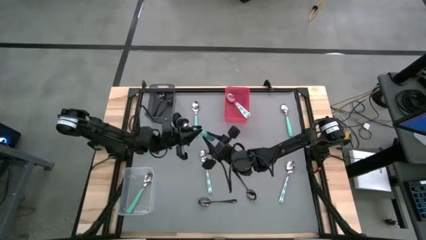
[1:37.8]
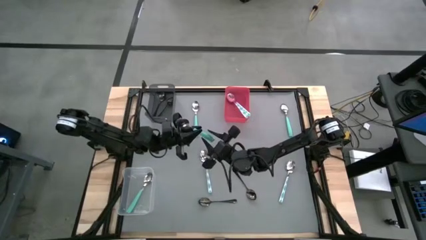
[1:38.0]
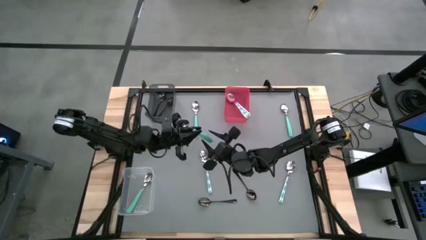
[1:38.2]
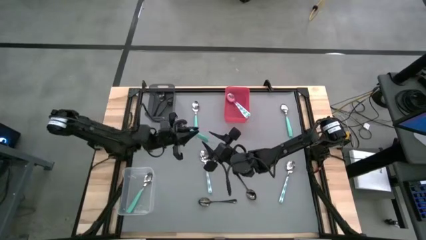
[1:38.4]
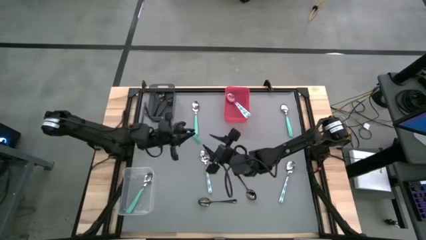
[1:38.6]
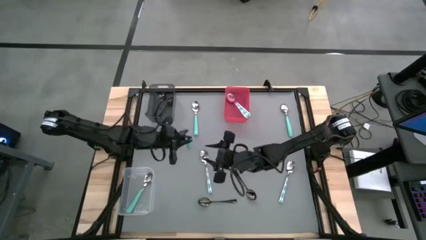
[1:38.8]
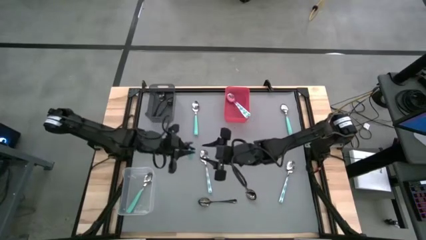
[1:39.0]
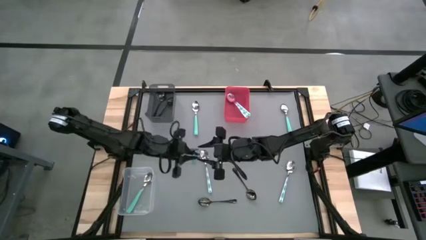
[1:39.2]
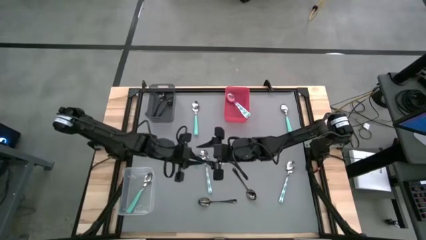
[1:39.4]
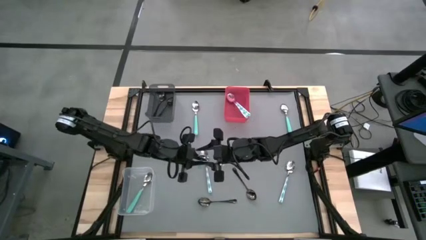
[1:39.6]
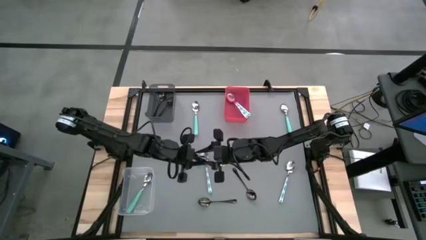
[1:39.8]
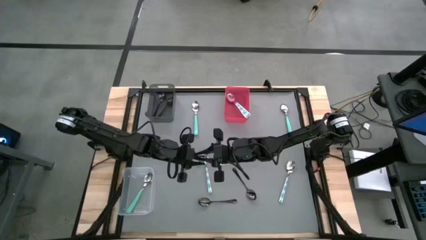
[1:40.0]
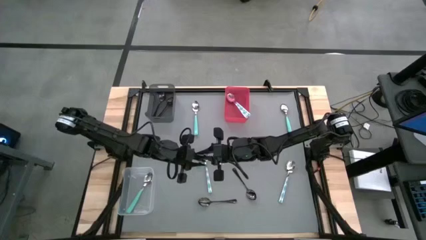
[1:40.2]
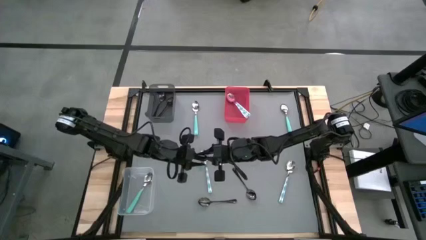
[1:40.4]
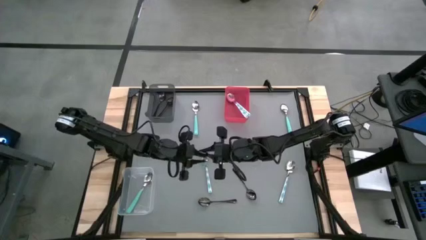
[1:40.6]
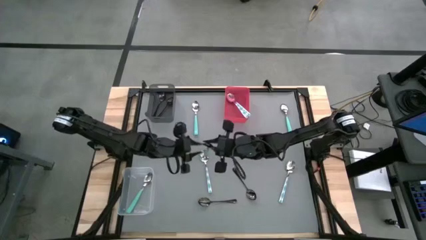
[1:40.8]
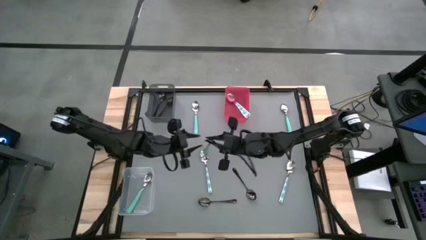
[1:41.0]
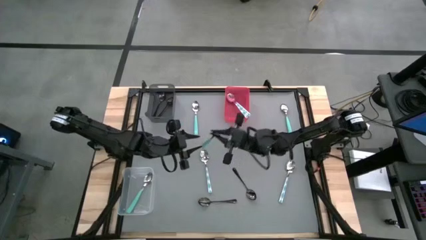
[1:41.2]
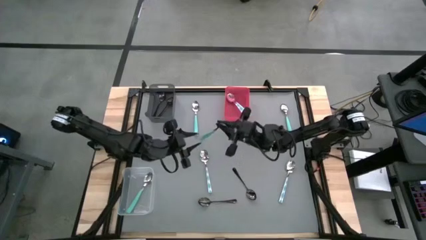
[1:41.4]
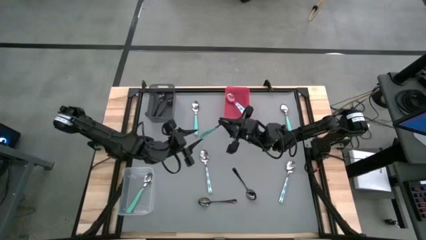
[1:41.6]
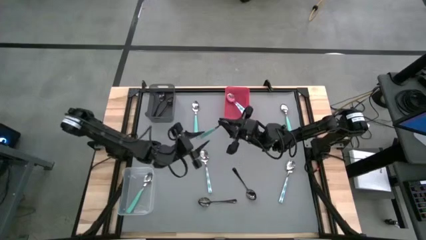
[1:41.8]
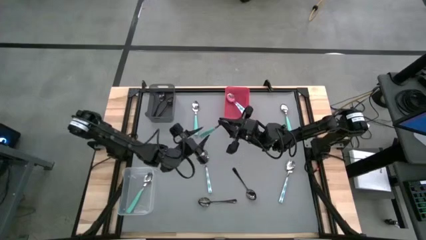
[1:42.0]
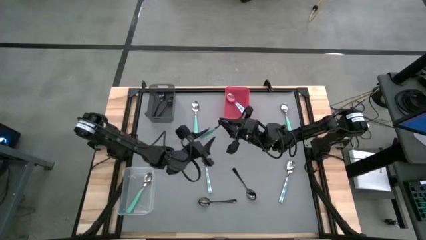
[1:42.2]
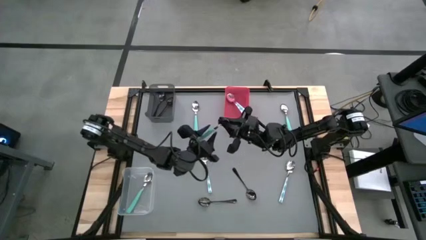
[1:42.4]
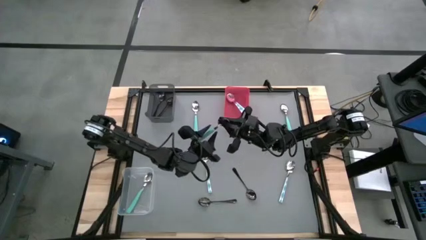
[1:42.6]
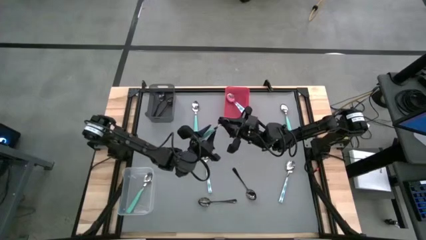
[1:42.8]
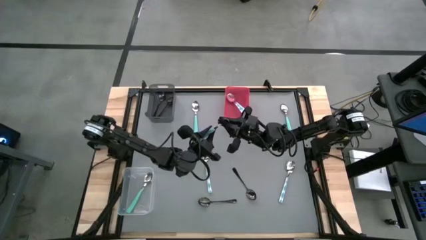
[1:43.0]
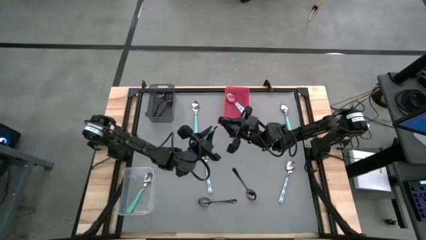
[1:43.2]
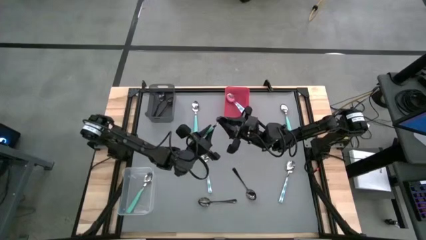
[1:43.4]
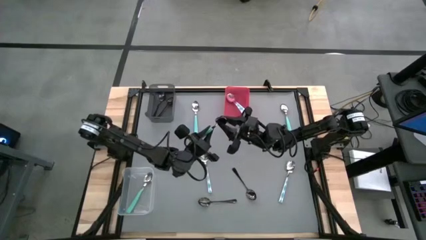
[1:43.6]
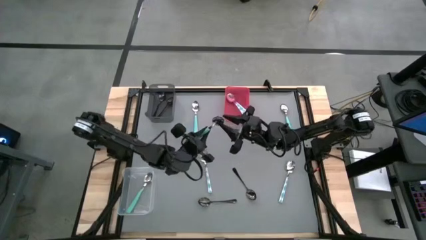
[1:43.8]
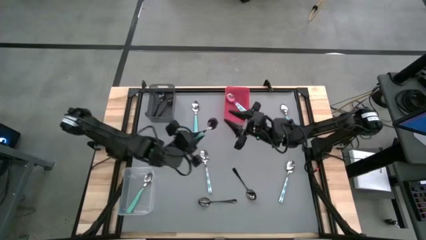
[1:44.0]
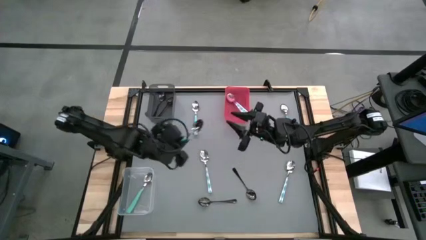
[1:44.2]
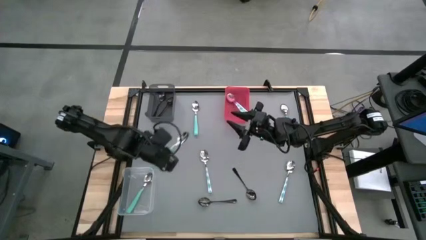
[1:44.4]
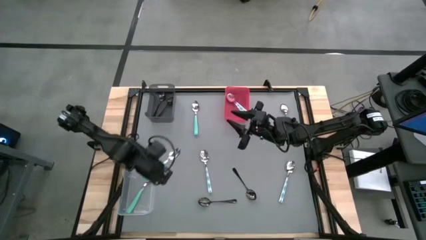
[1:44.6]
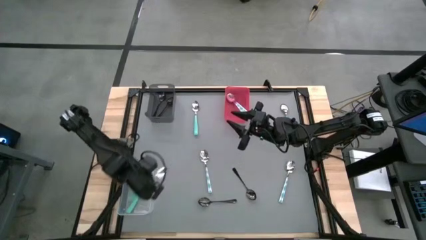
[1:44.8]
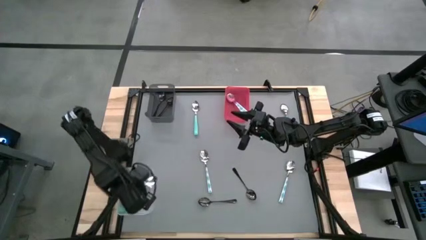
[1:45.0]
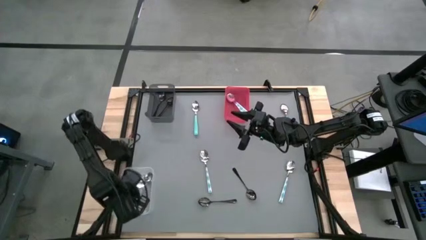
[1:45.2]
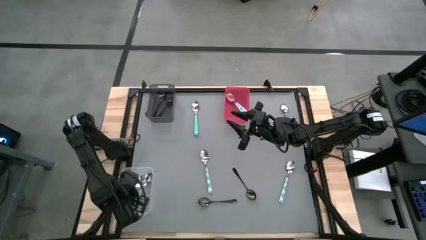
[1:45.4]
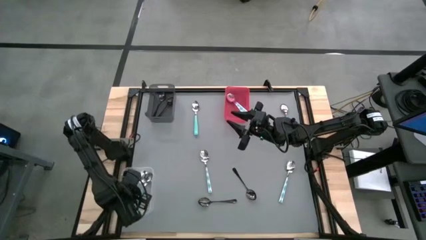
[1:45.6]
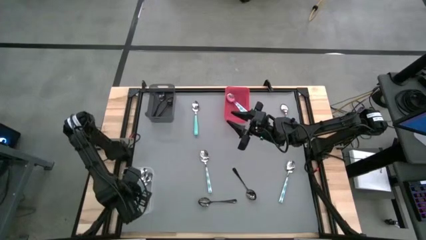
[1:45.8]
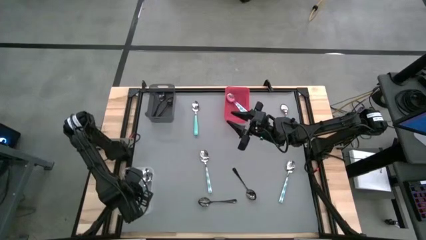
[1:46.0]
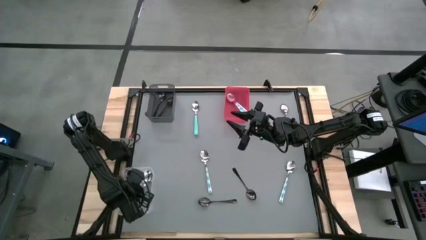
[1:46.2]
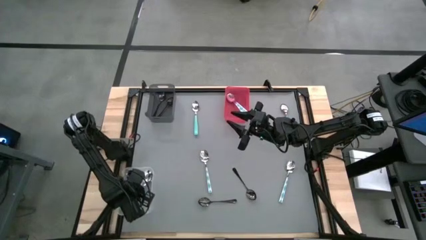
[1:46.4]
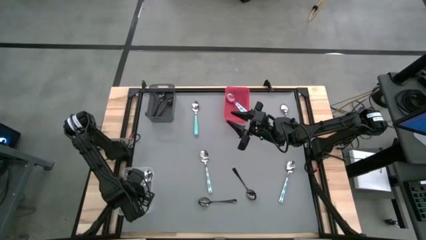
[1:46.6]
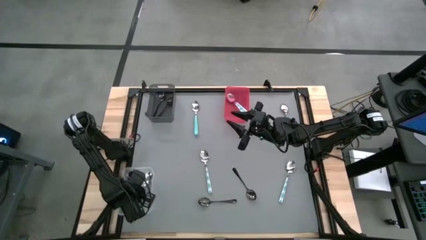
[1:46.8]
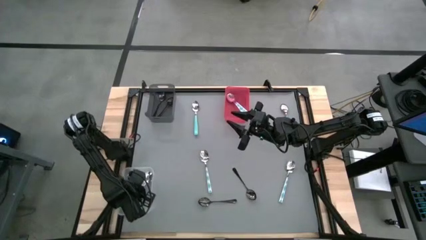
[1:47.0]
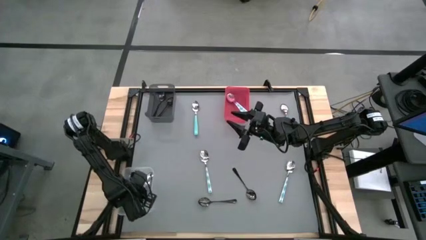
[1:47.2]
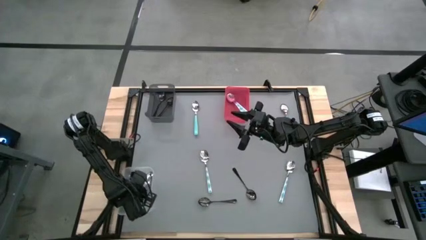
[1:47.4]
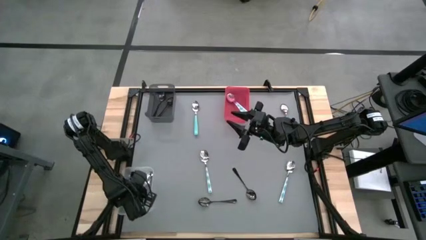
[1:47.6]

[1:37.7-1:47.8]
Task: Sort silverware by color (type)
Put the green spoon into the transparent bin

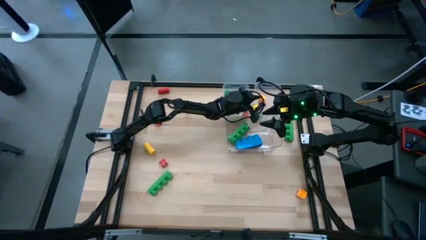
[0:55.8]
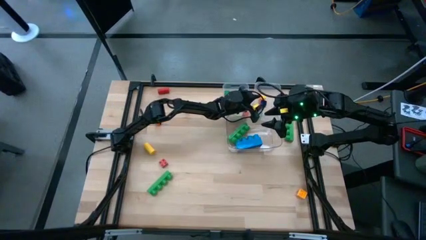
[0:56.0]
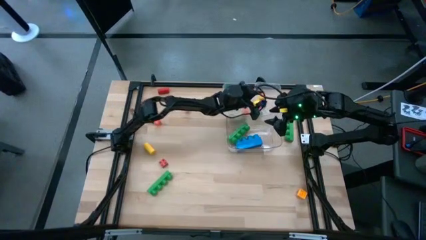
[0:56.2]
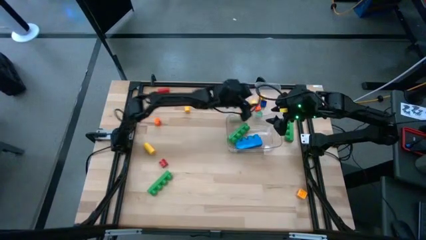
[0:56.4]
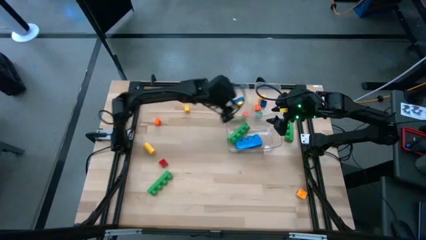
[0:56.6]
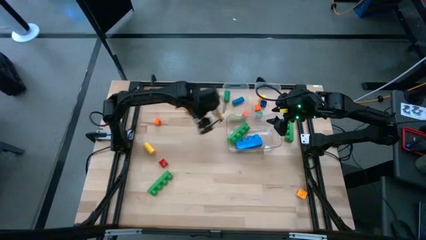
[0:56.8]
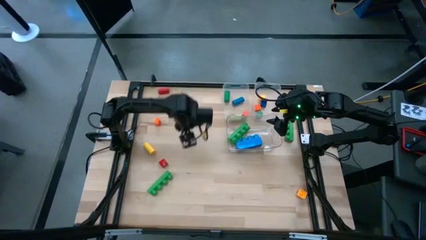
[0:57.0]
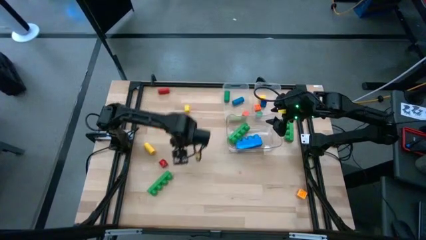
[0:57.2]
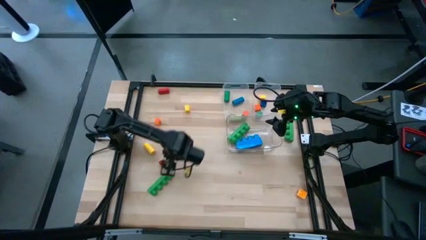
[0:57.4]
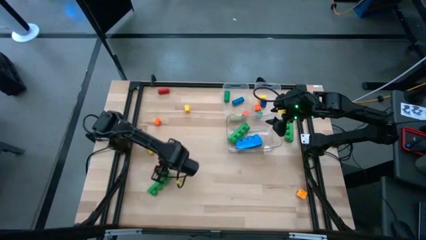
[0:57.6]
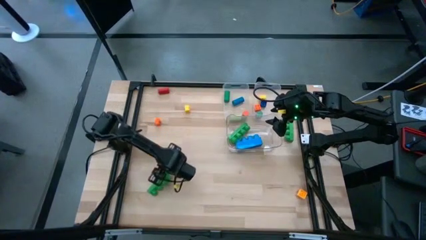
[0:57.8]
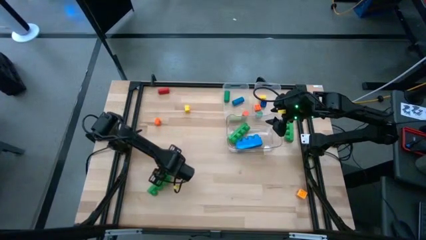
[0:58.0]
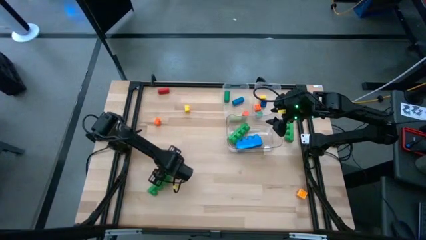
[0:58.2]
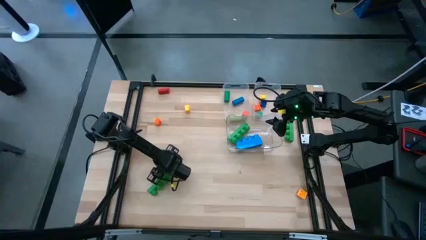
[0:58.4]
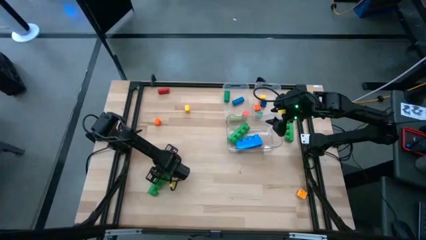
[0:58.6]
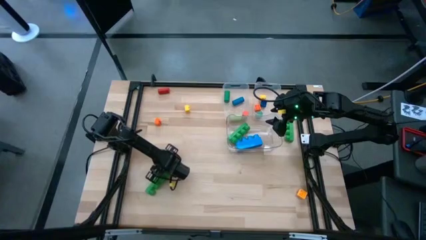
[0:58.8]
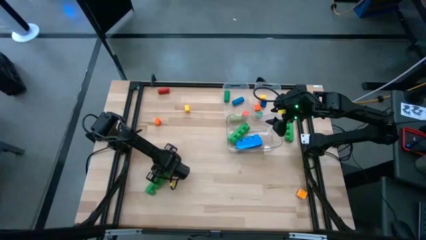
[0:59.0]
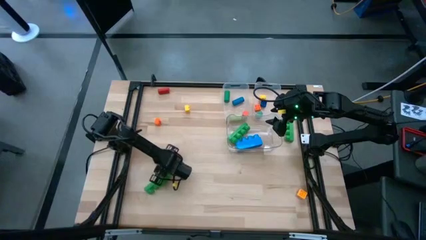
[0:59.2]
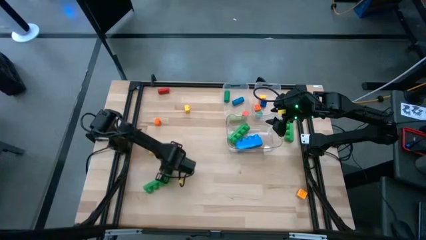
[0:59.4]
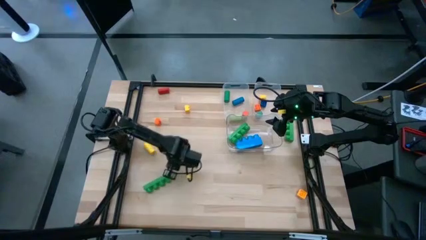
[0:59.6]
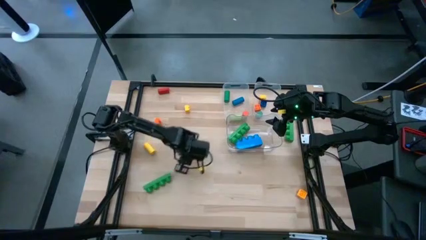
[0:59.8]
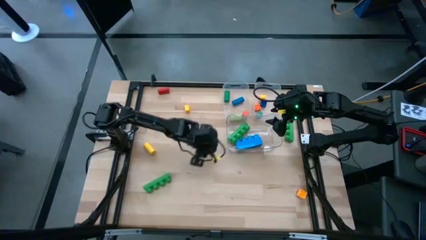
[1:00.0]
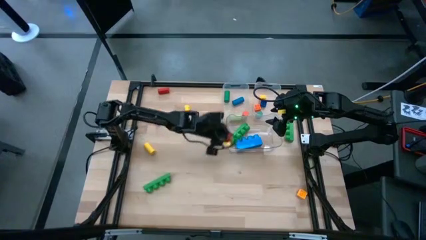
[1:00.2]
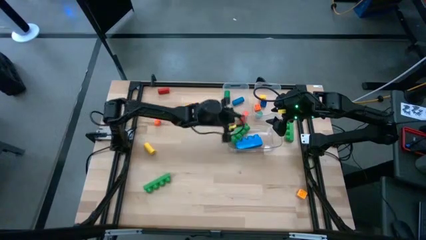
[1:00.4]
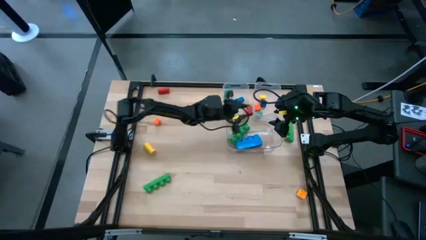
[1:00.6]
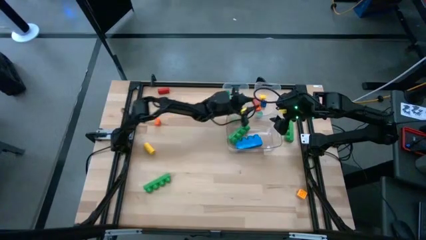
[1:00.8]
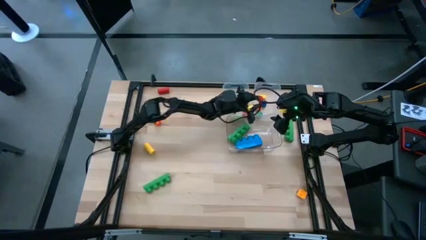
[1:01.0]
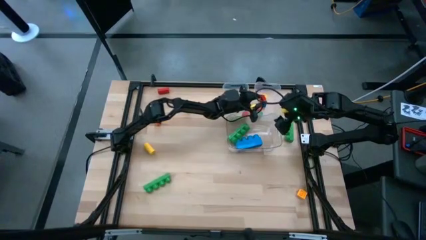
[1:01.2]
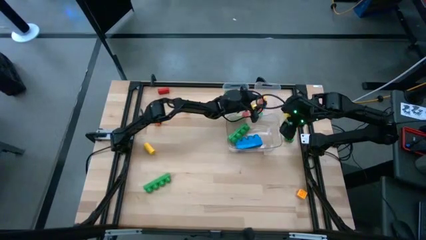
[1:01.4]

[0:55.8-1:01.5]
Task: Sort blocks by size
Put the small red 4 stud game piece into the right transparent bin

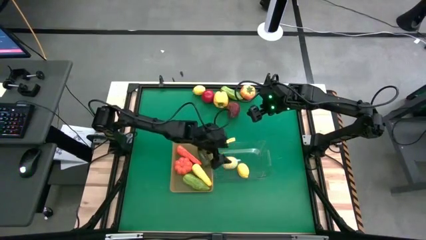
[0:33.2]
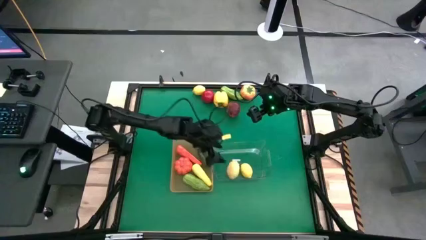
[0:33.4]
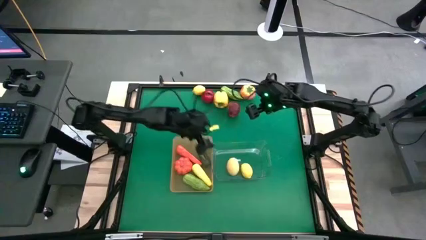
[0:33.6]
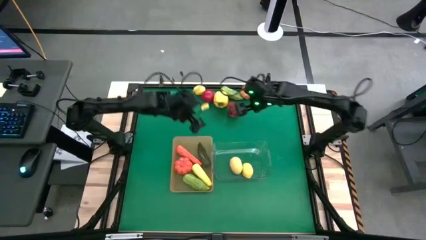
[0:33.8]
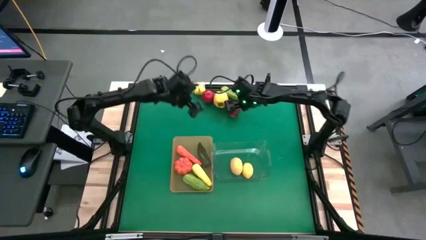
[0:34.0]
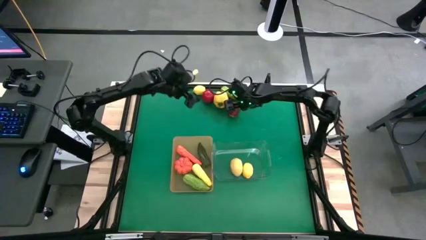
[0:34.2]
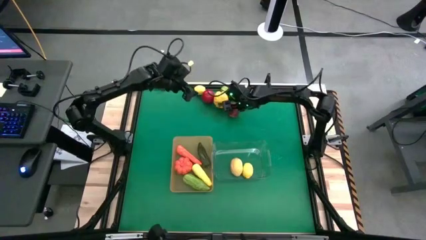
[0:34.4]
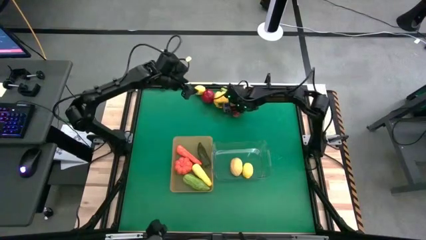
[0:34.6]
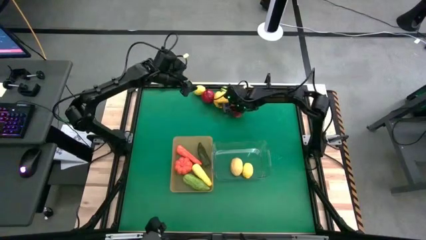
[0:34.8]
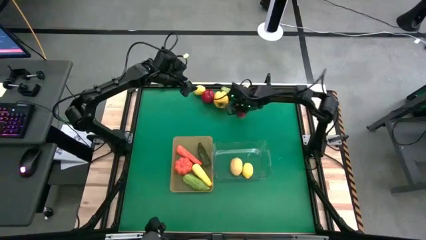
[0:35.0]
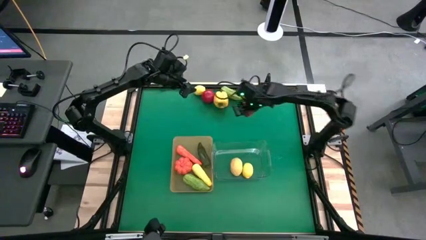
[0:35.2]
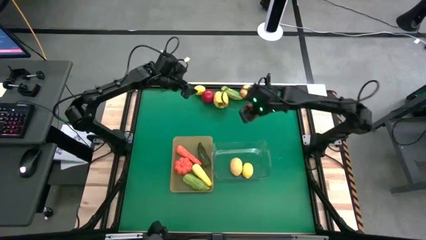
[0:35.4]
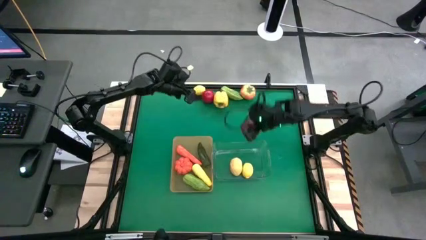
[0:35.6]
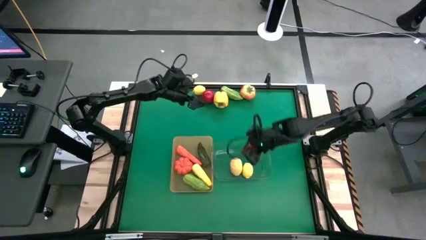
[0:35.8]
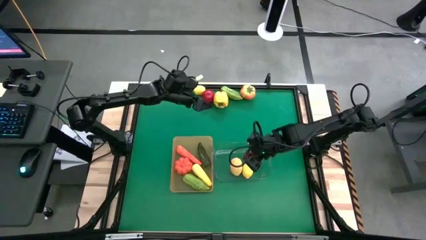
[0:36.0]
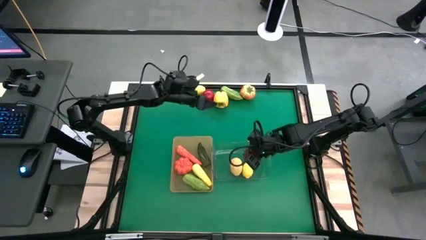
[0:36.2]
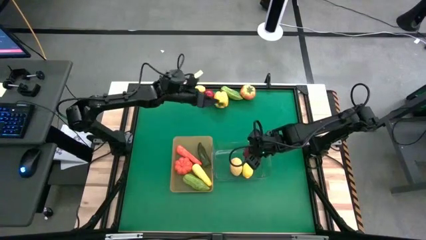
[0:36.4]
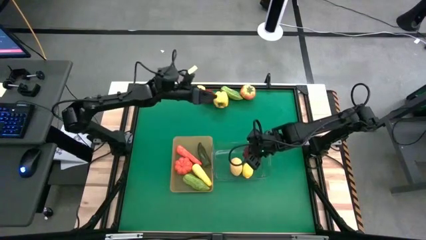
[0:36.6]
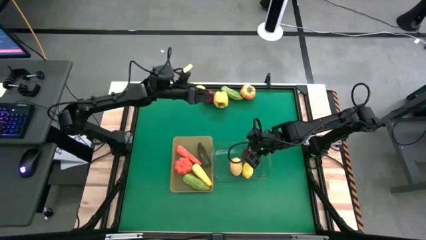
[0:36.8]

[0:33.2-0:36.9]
Task: Sort produce into baskets
Put the apple into the transparent bin
